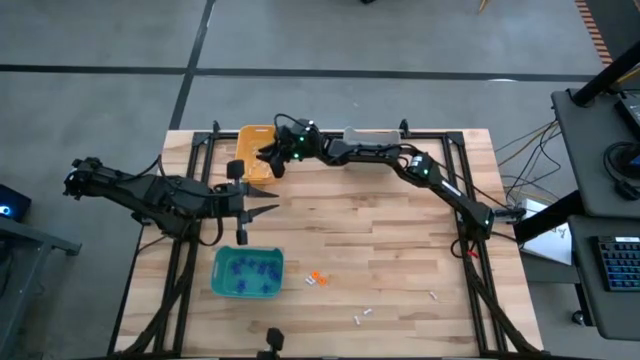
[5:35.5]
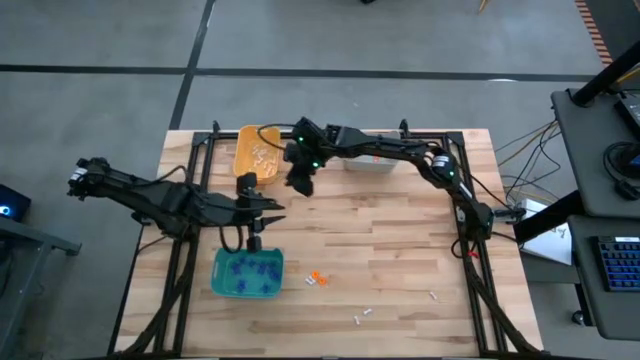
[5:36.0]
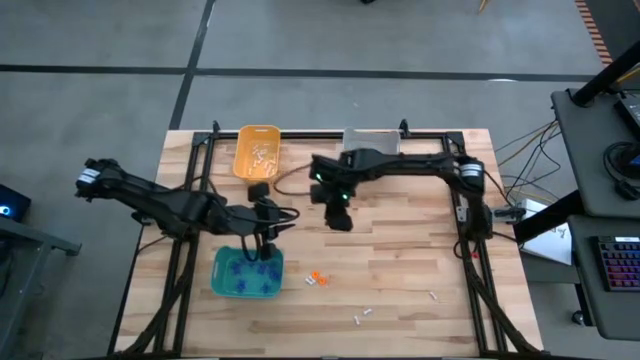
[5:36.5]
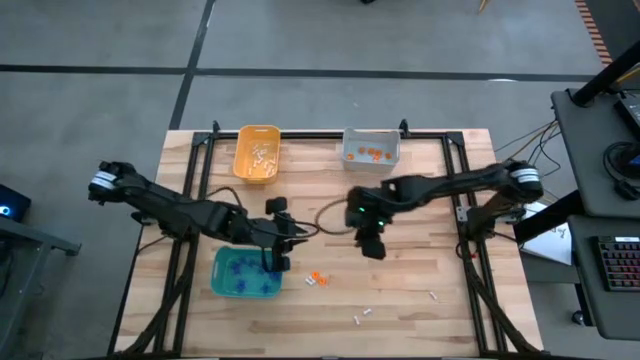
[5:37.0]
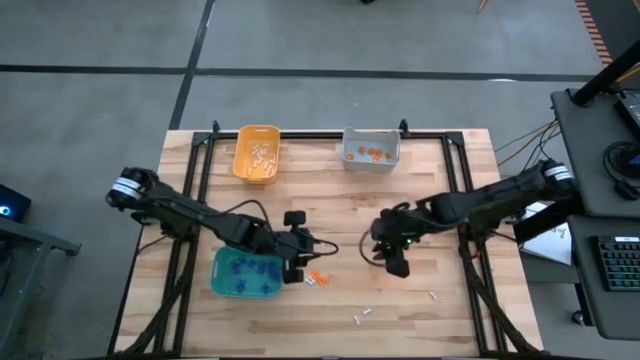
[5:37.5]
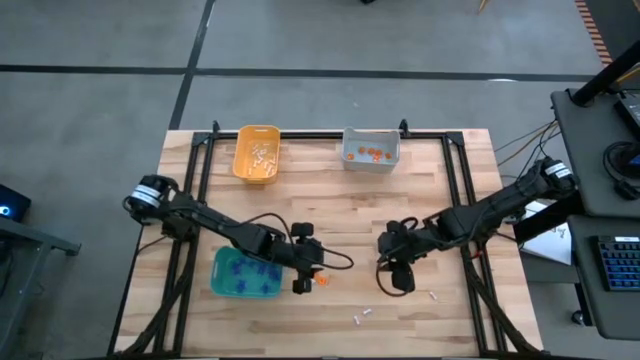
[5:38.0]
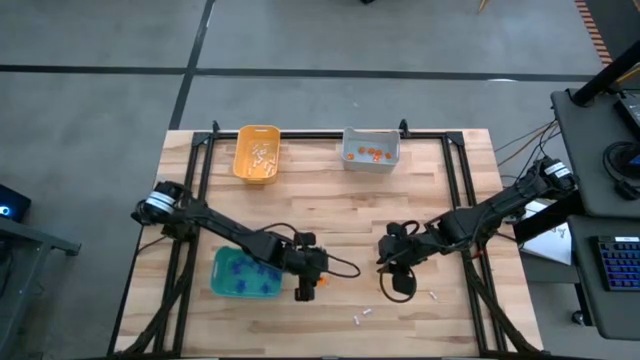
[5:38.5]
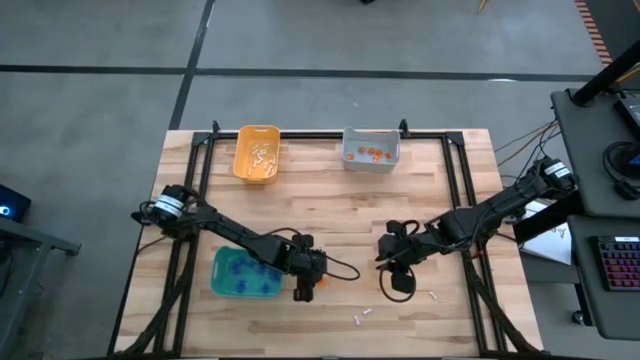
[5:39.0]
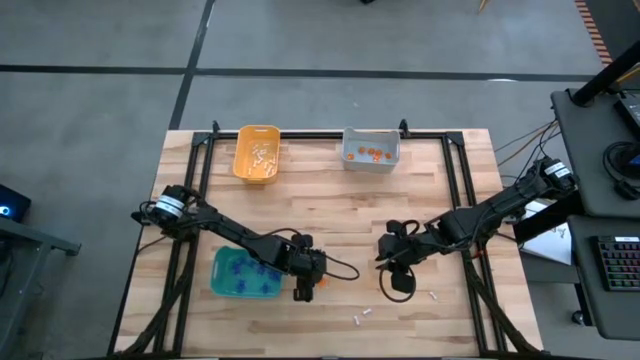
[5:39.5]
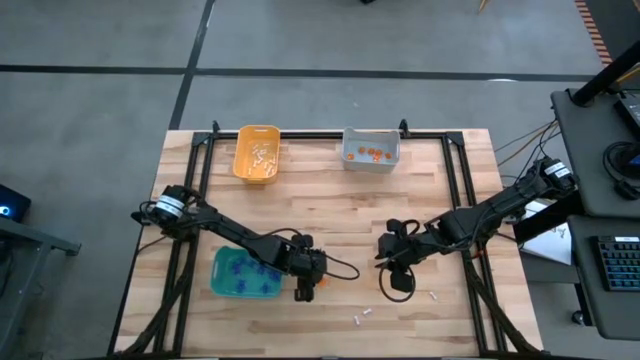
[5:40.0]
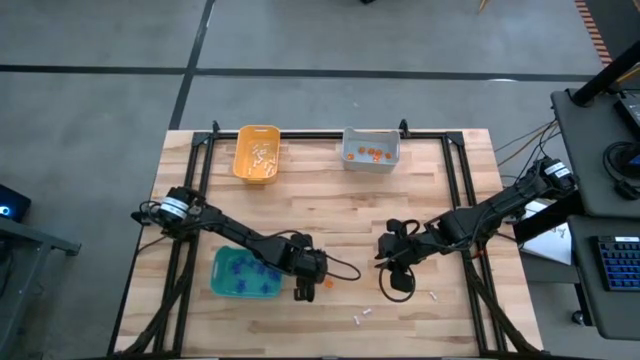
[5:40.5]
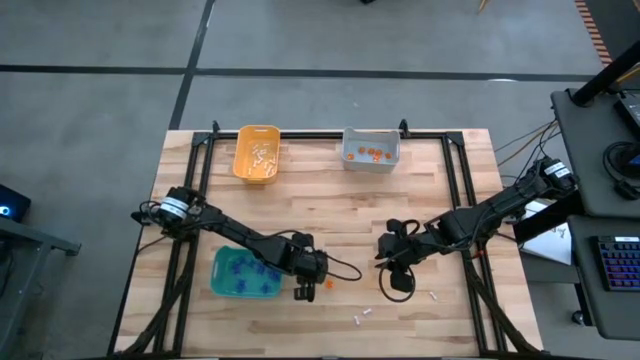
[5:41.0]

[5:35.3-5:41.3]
Task: Sort Halloween decoration
Put the orange pumpkin toy into the gray bin

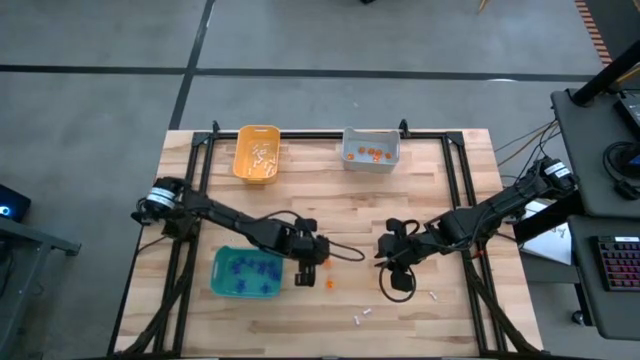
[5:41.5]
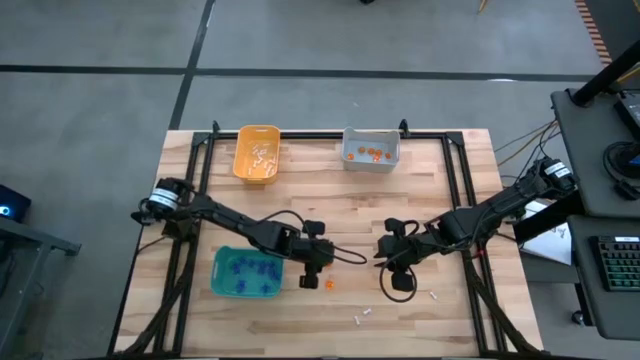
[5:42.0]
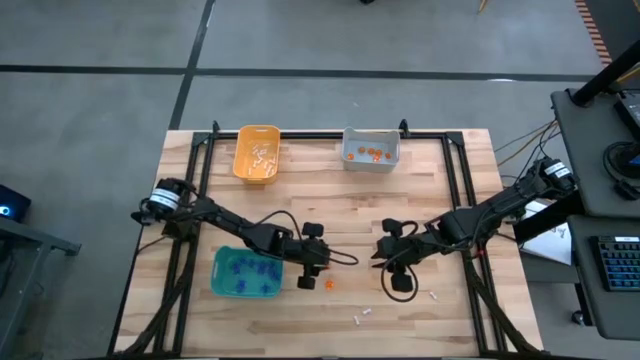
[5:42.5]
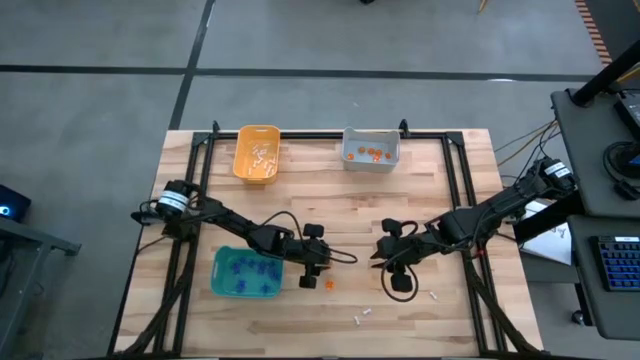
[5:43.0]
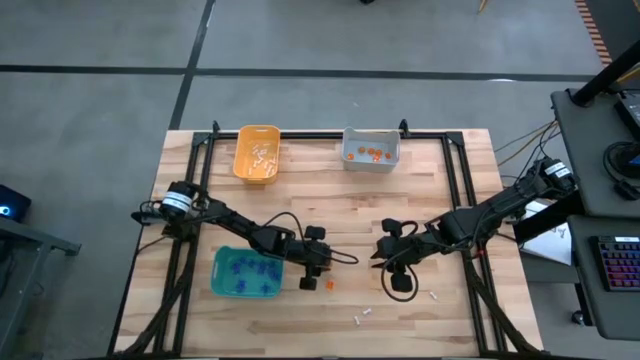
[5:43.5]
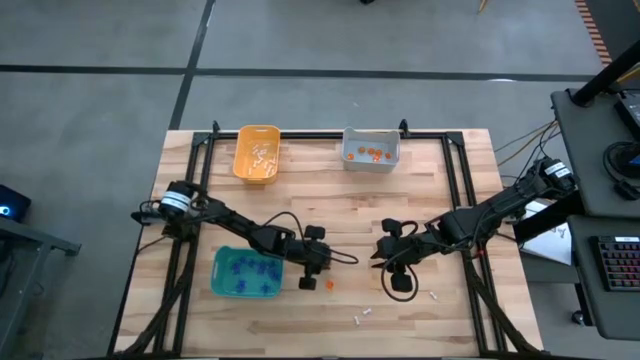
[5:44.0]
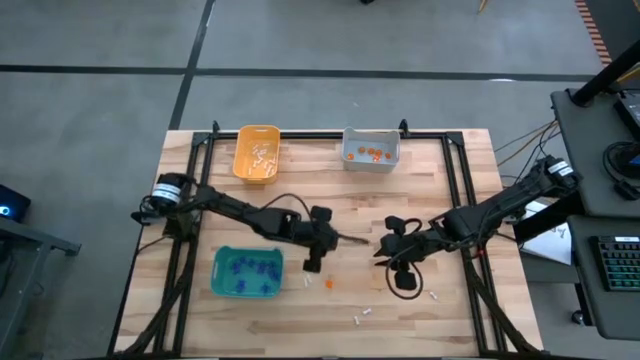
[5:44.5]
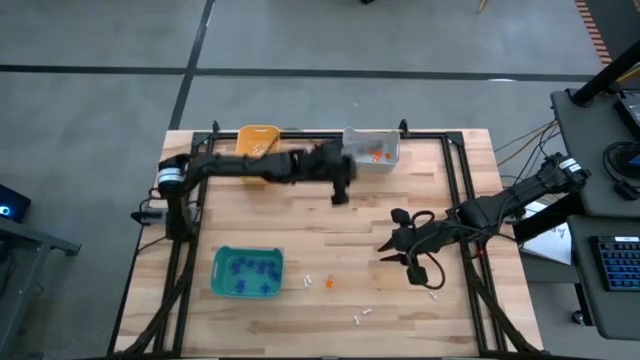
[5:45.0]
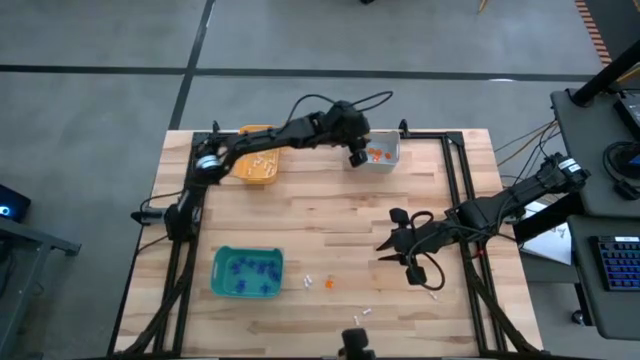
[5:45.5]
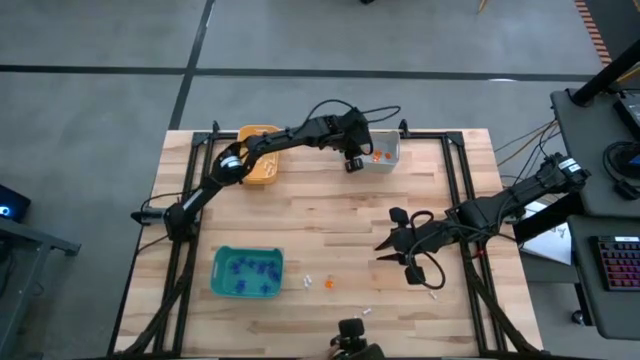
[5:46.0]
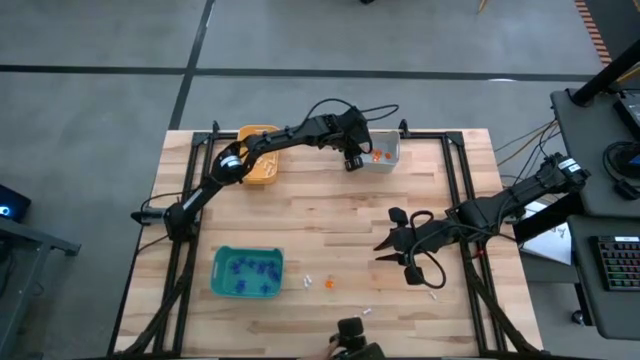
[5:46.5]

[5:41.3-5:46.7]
Put the orange pumpkin toy into the gray bin

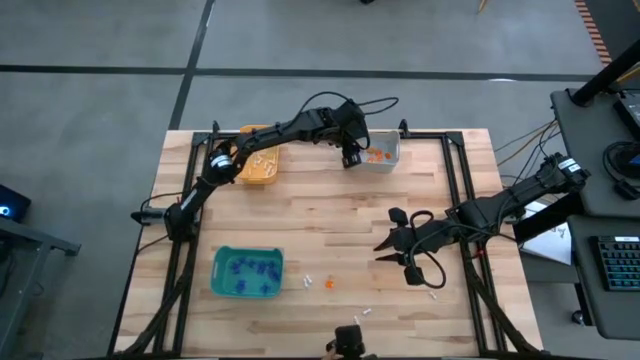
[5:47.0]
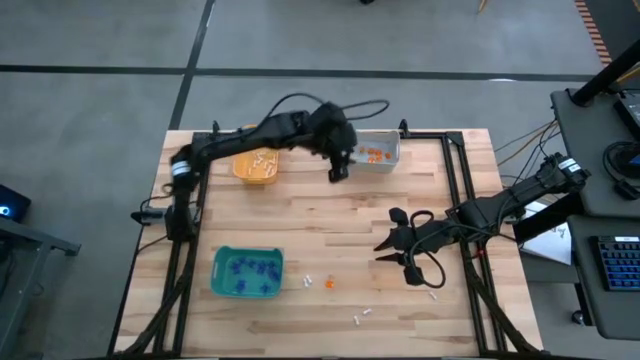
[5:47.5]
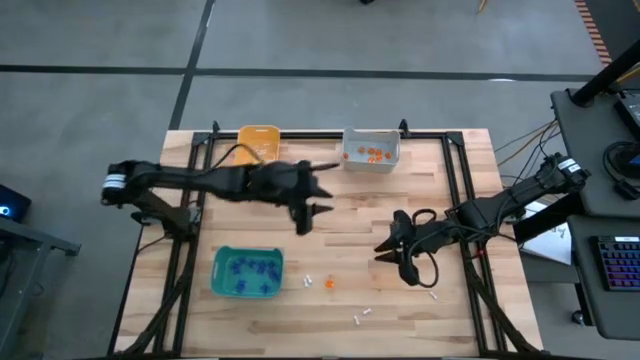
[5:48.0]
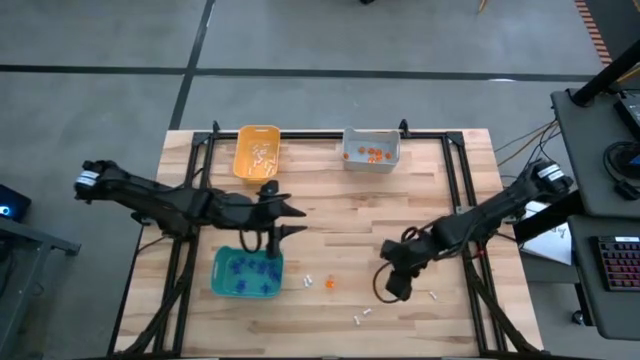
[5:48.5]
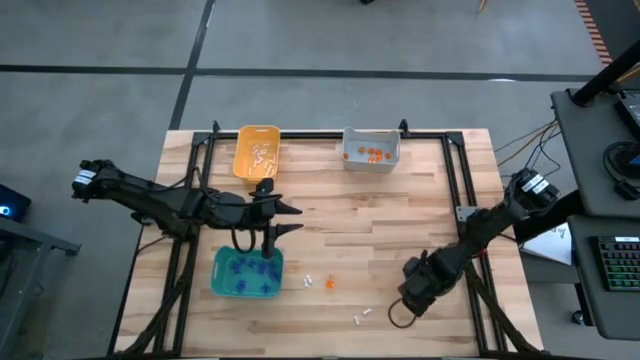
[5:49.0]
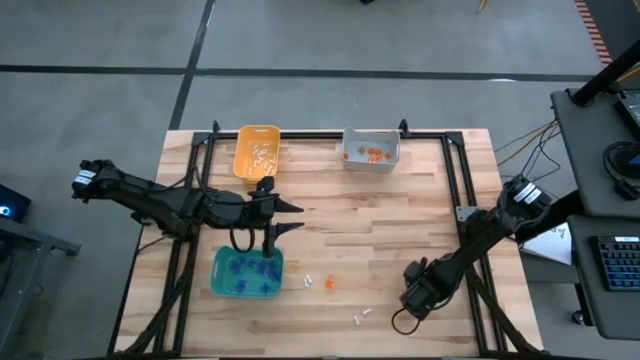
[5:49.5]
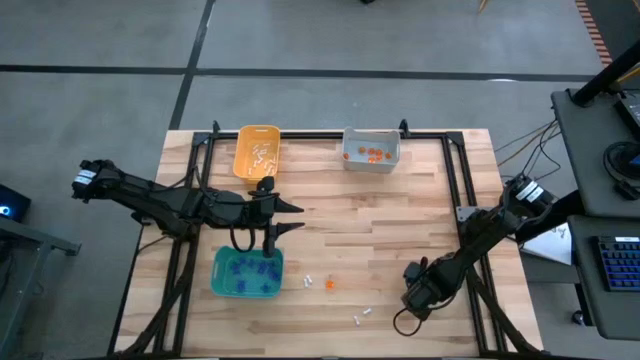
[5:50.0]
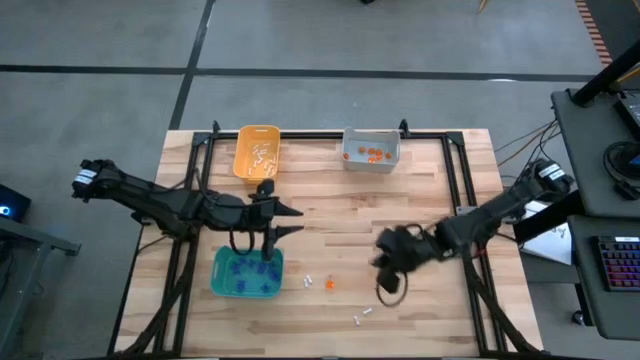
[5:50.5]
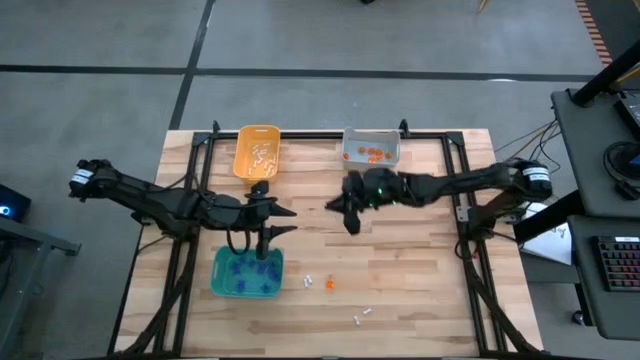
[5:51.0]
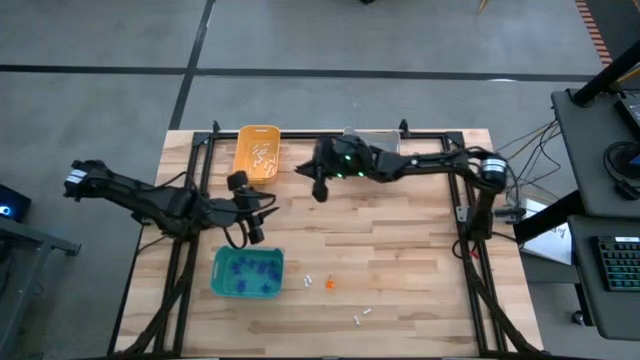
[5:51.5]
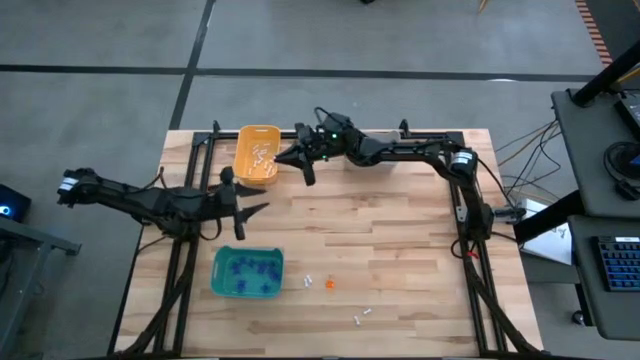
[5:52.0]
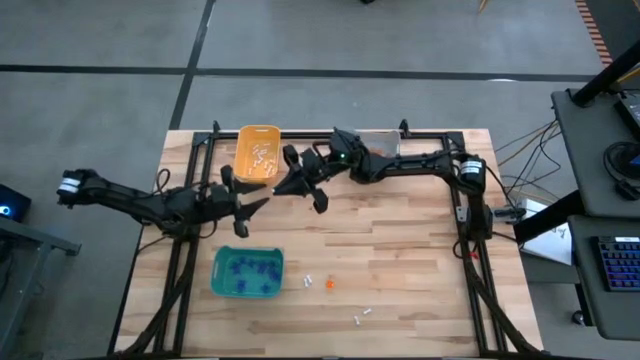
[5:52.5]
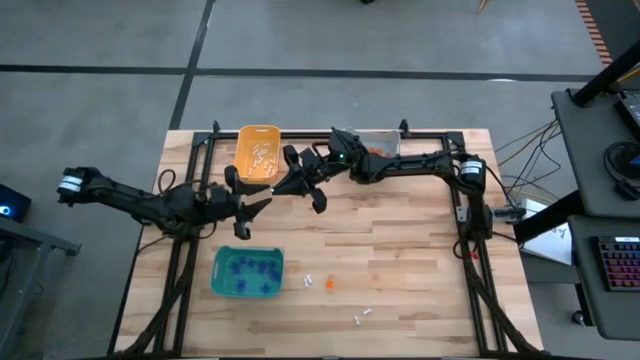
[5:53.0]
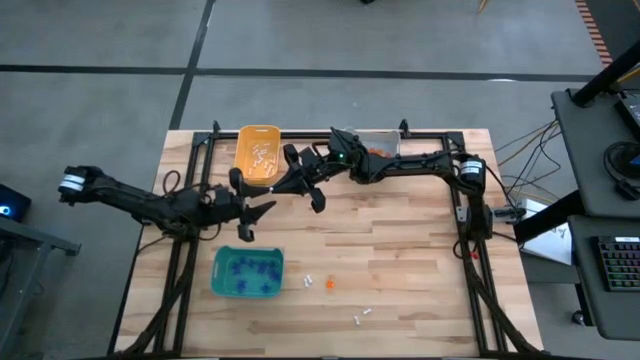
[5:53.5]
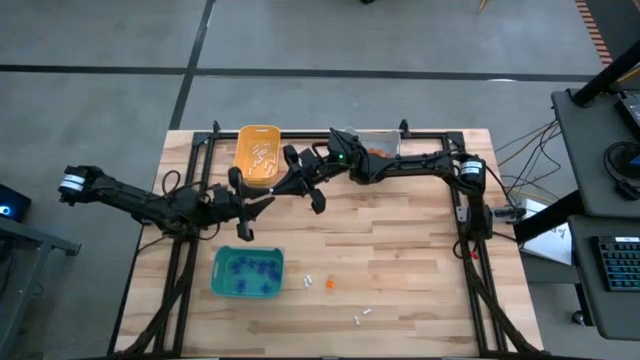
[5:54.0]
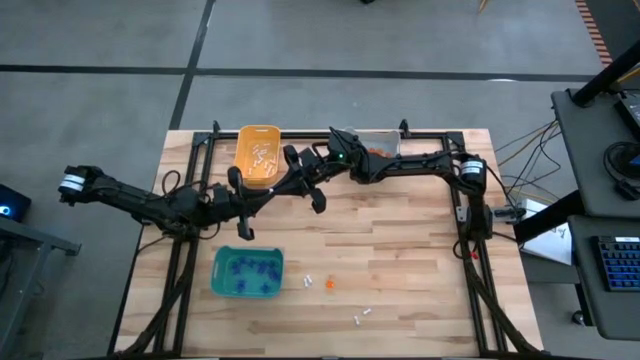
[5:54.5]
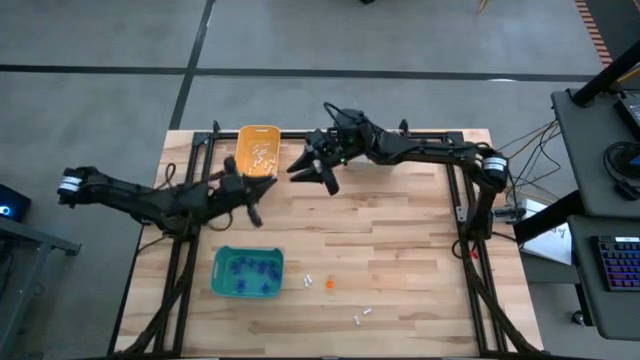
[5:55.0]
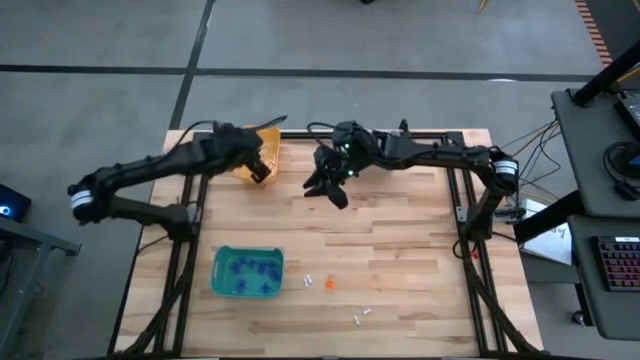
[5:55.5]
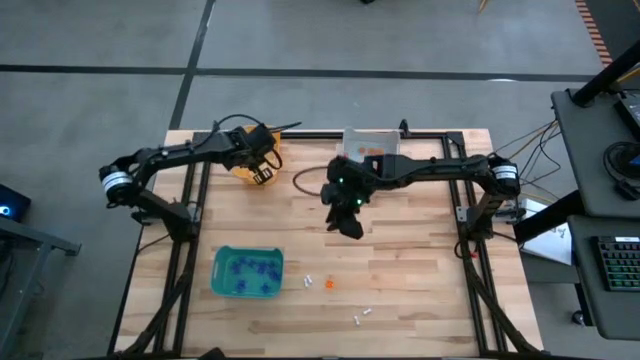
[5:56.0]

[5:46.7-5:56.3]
Put the white bone toy into the orange bin
